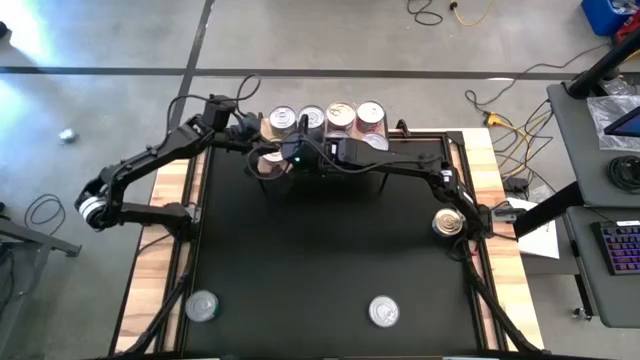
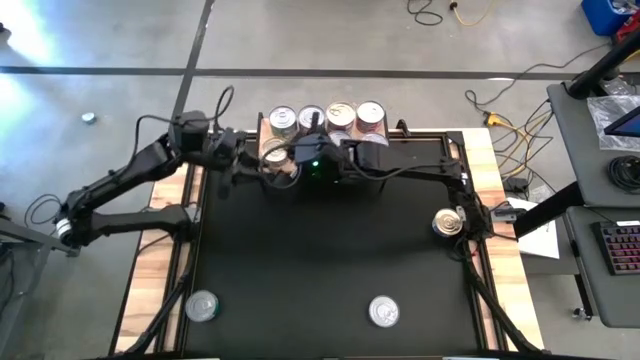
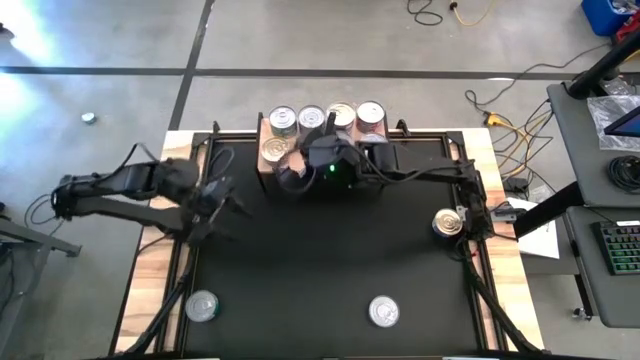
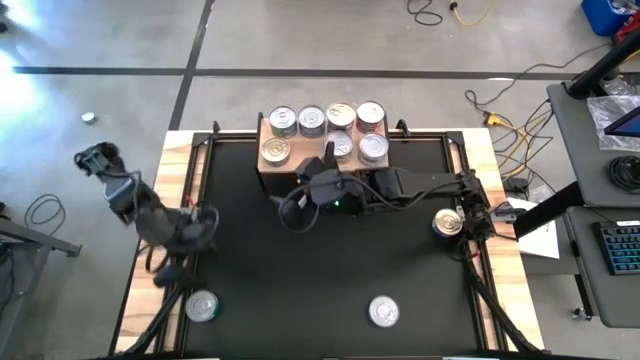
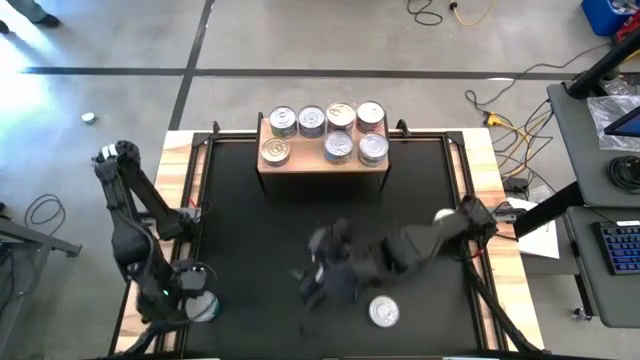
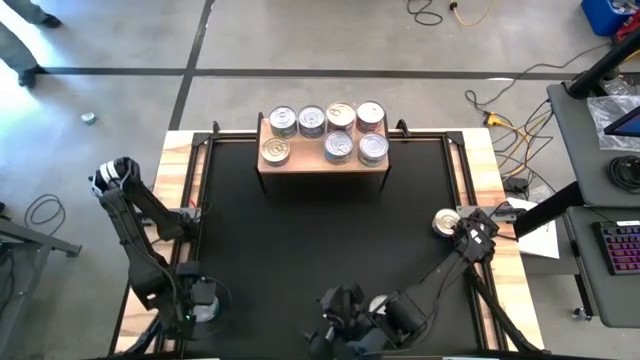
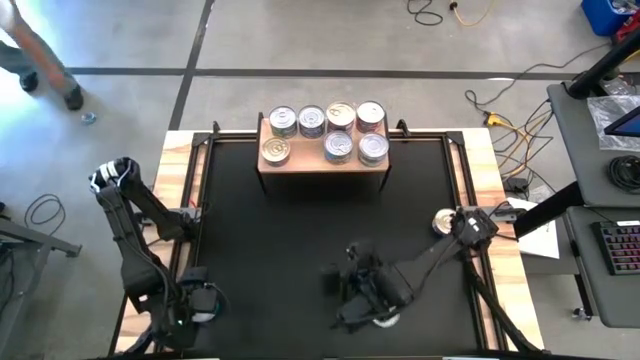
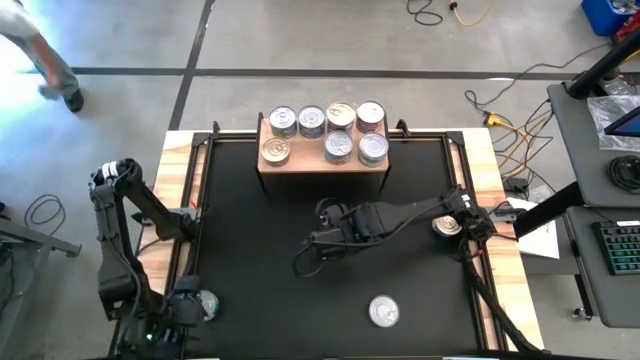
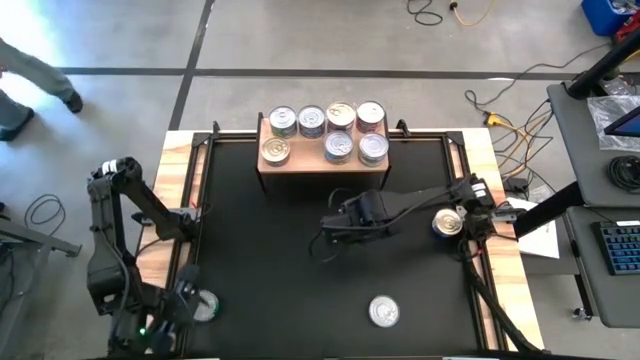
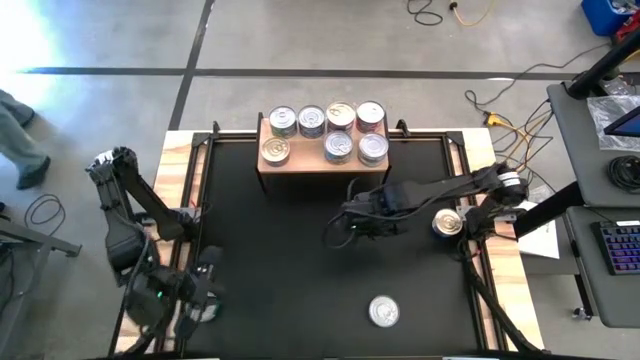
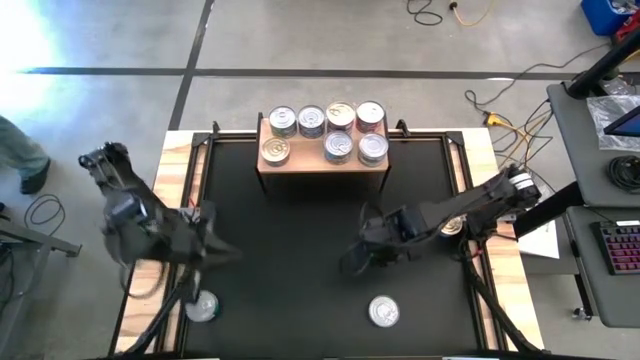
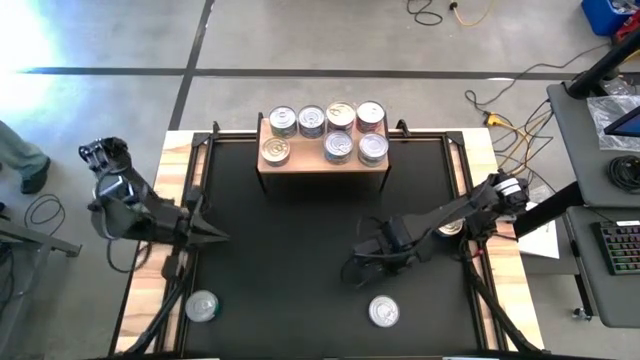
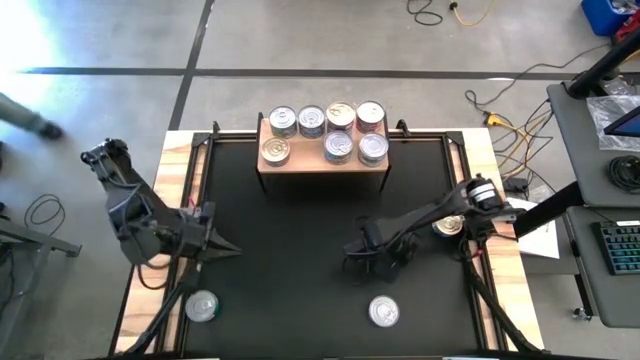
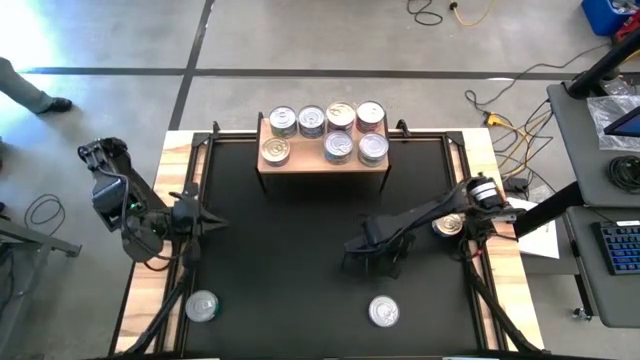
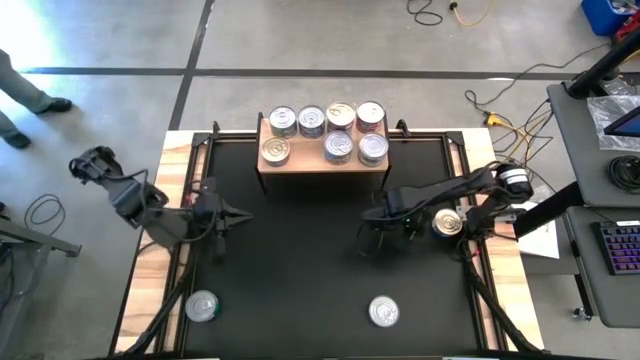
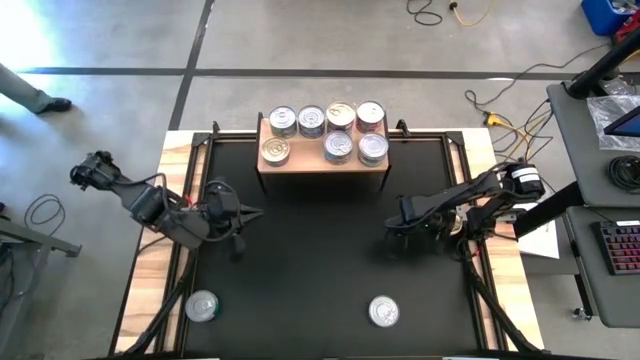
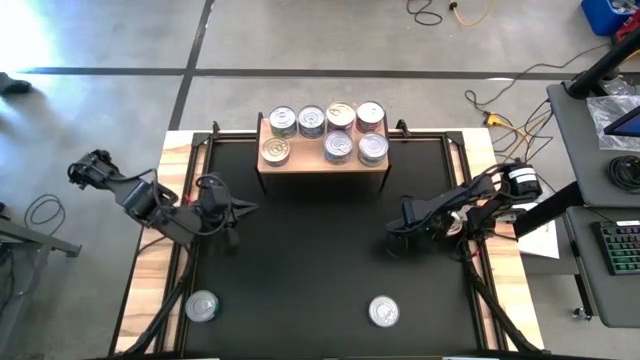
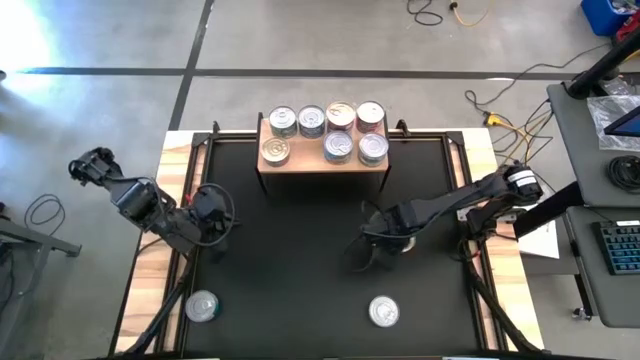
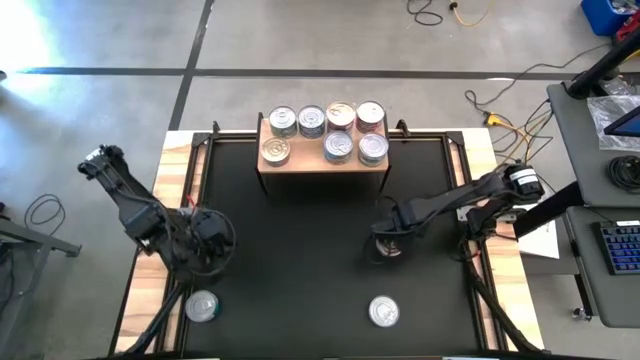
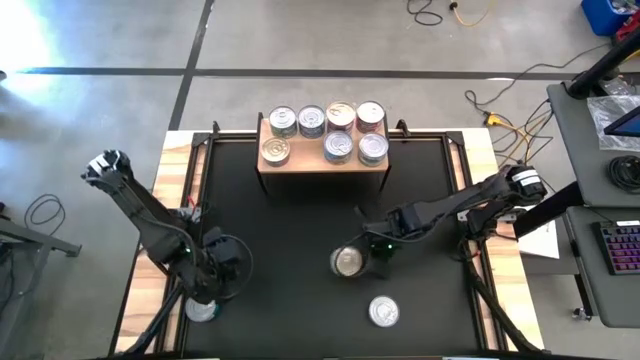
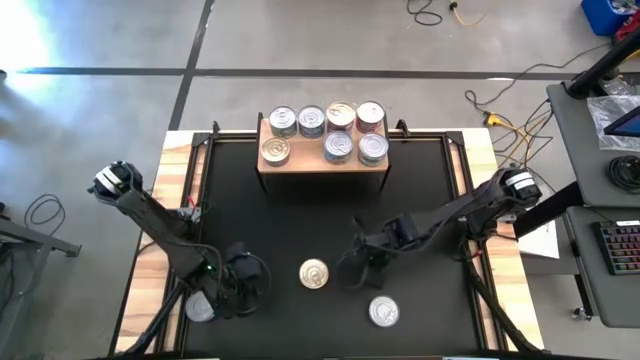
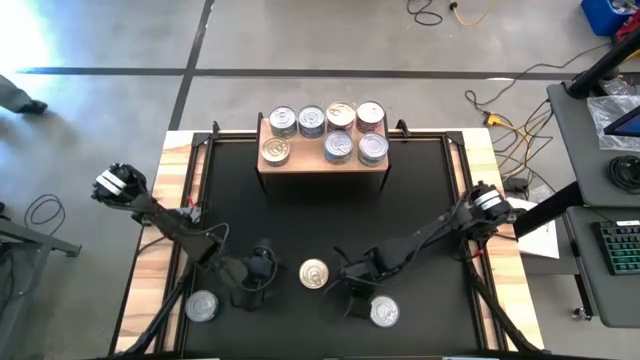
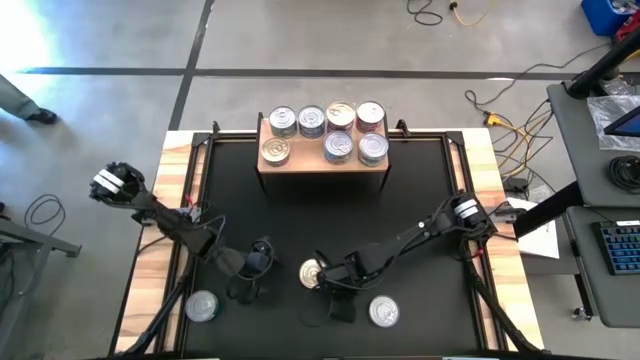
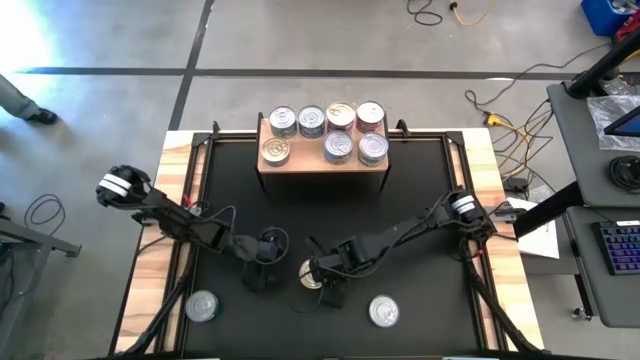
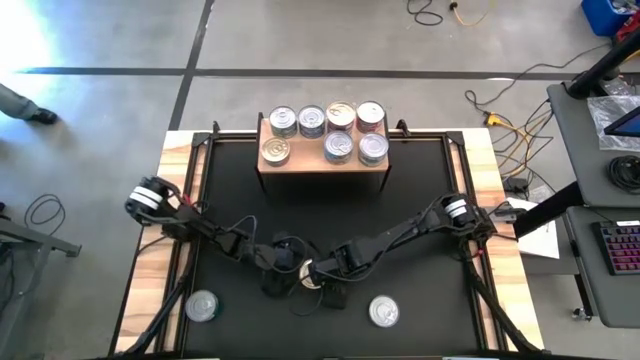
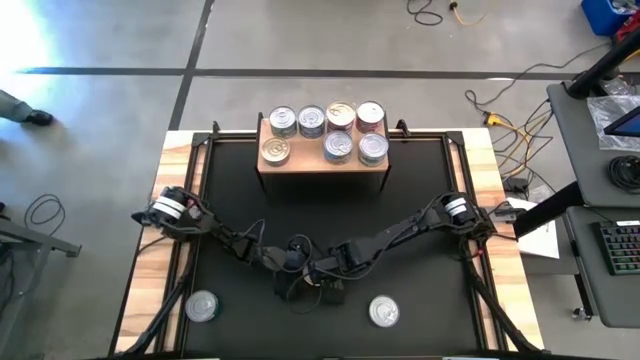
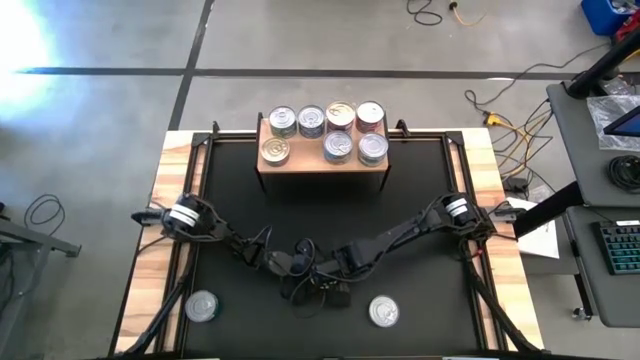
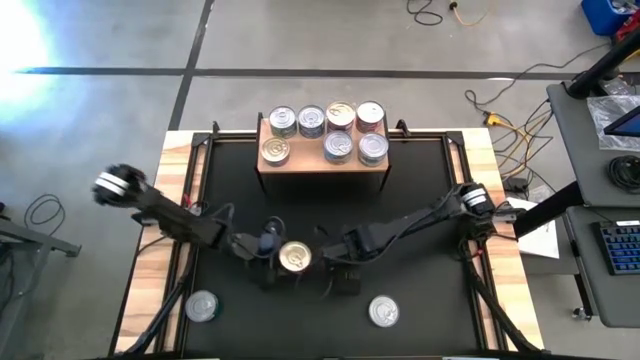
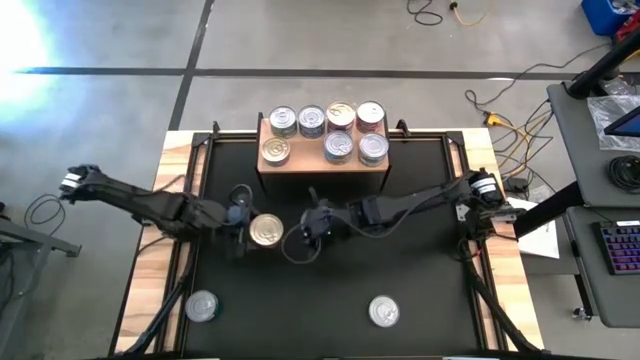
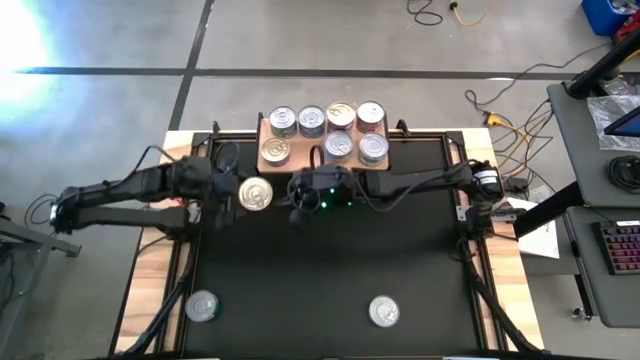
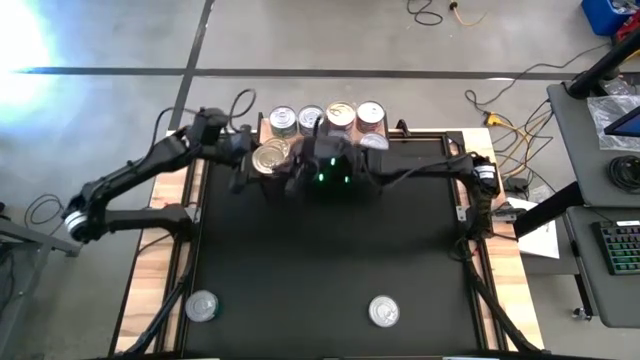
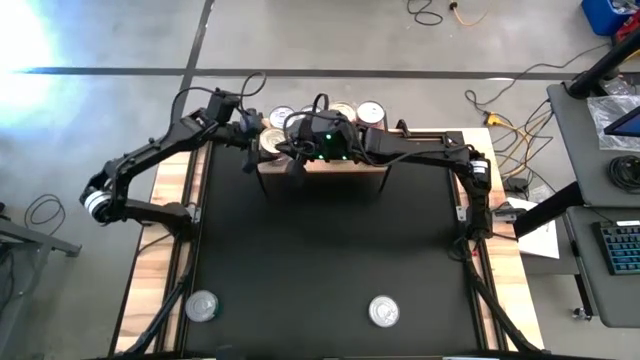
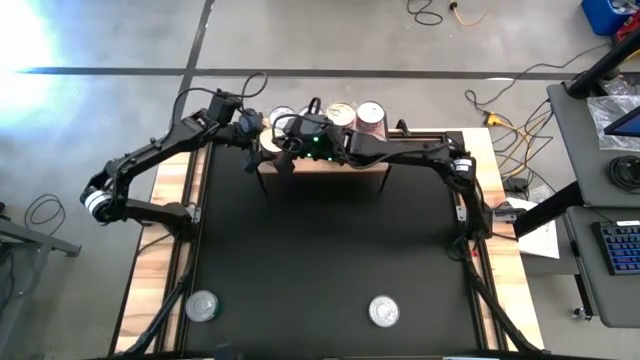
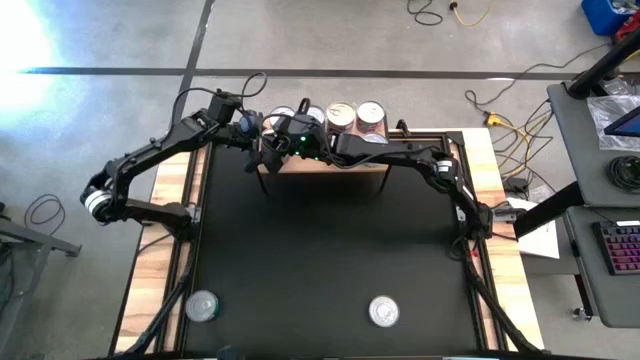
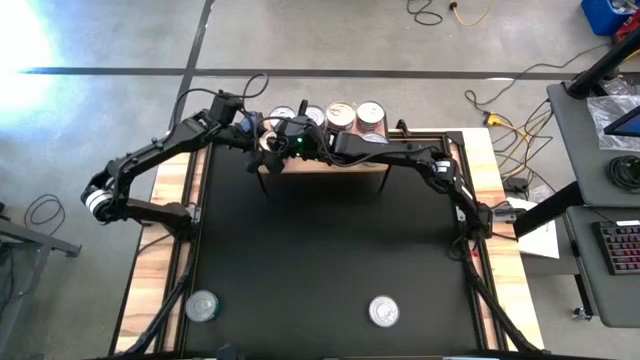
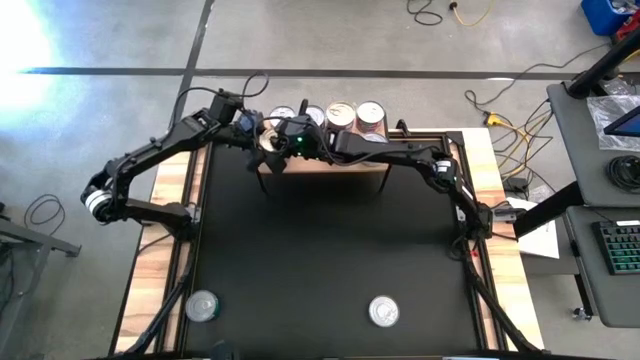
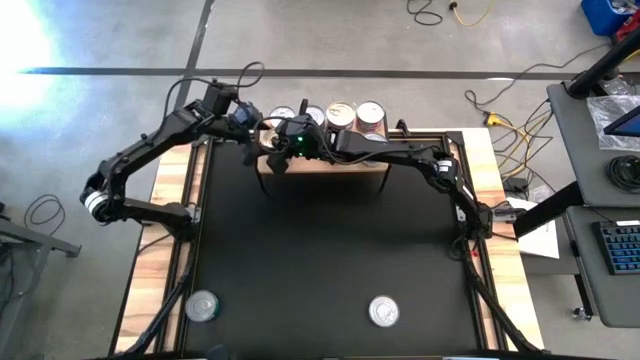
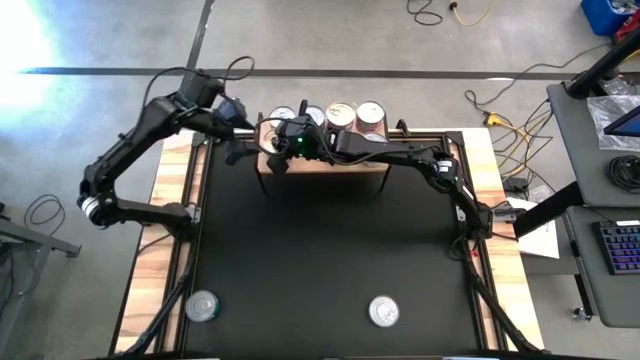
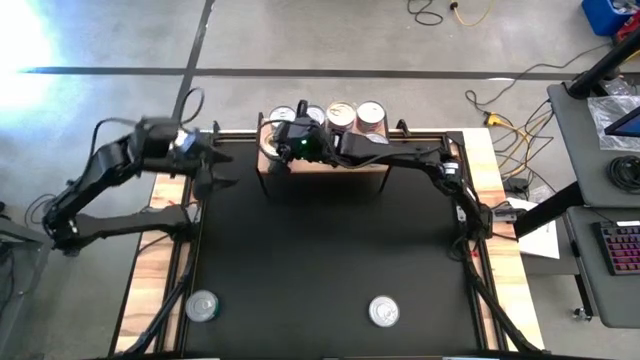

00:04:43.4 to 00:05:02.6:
Task: Stack canned seafood by type on shelf
Stack the blue-pink tuna can on top of the other blue-pink tuna can on the shelf

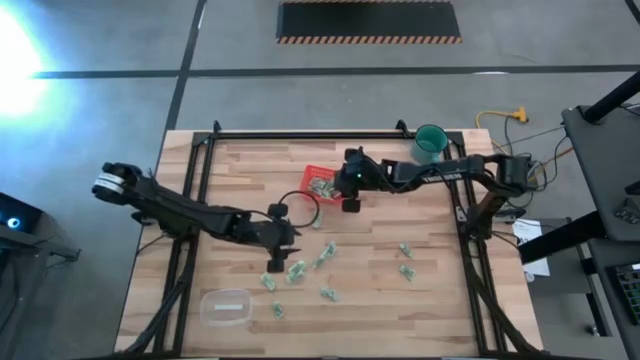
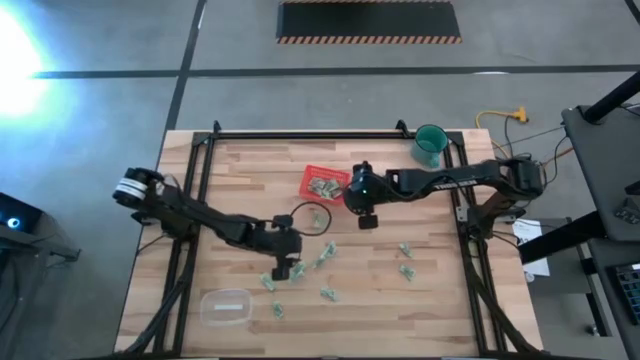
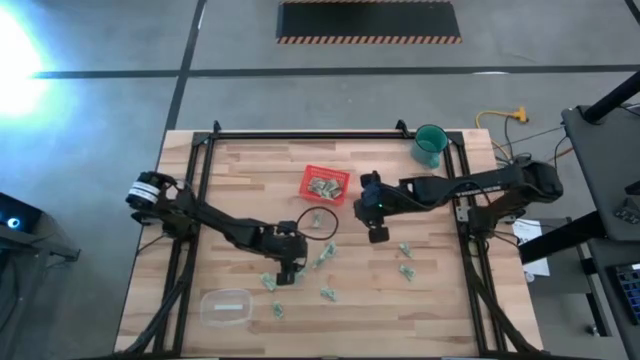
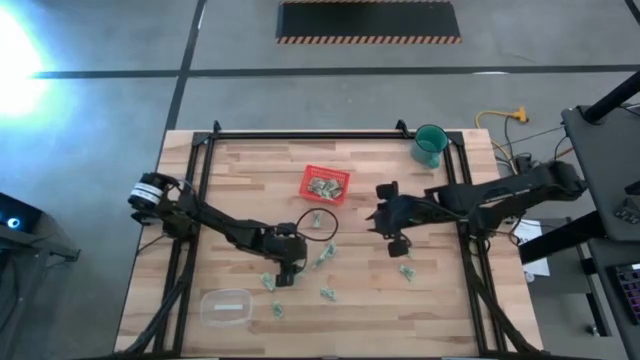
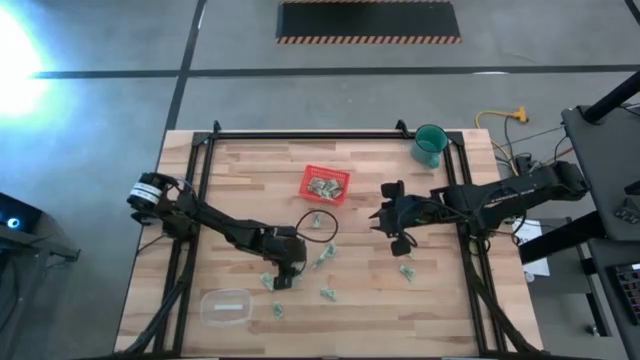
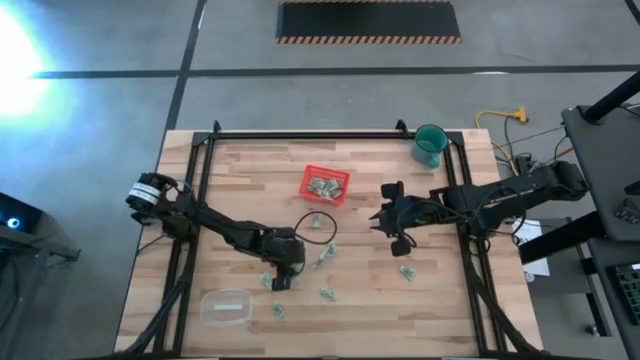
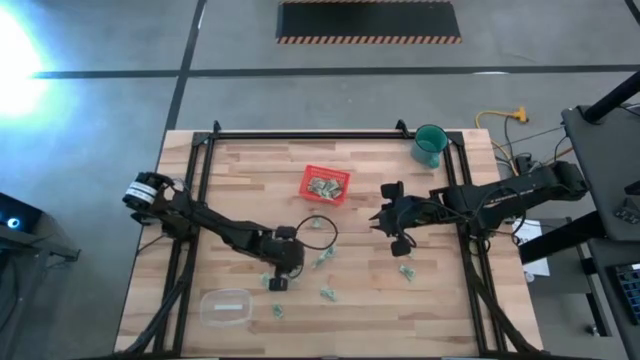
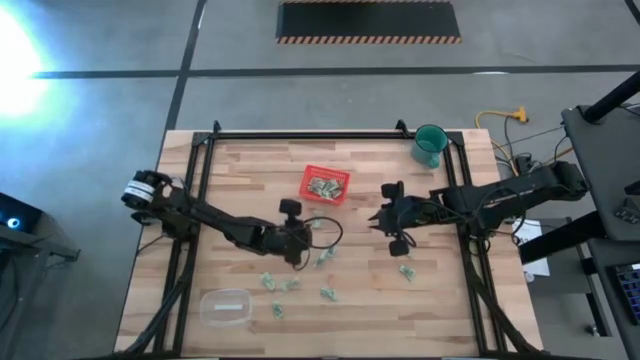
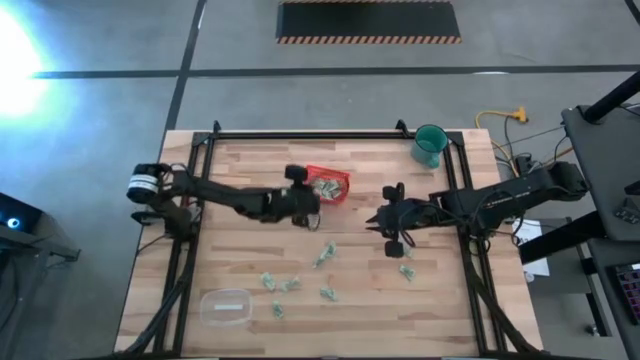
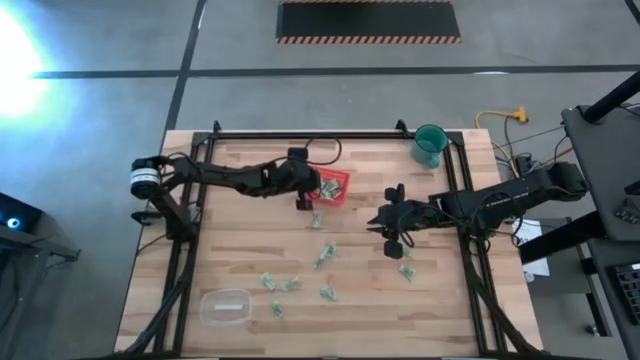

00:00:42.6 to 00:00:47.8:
Task: Pick and place items into bin
Put the stevia packet into the orange bin
